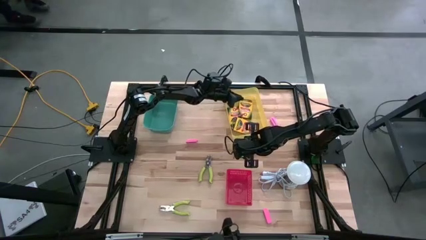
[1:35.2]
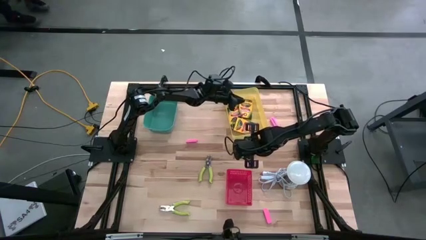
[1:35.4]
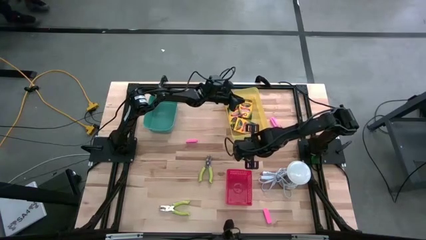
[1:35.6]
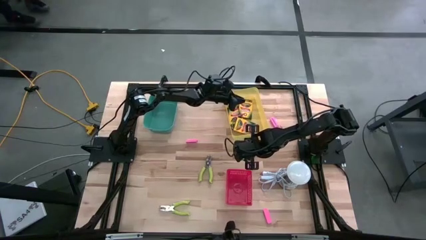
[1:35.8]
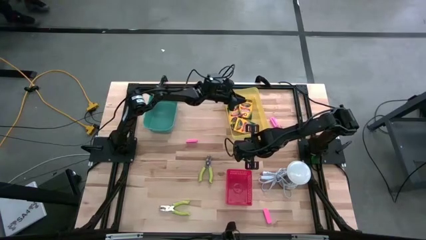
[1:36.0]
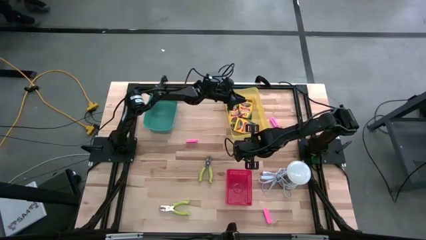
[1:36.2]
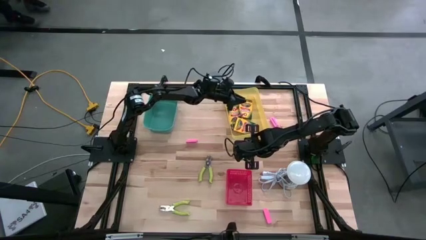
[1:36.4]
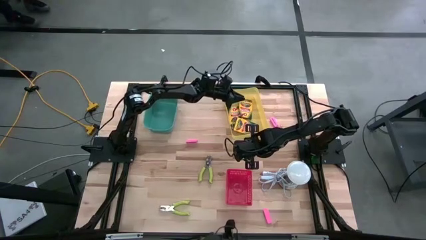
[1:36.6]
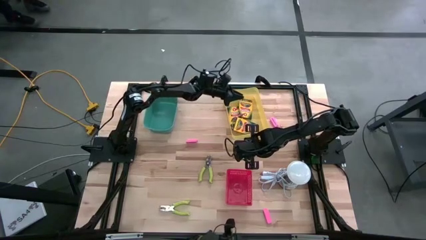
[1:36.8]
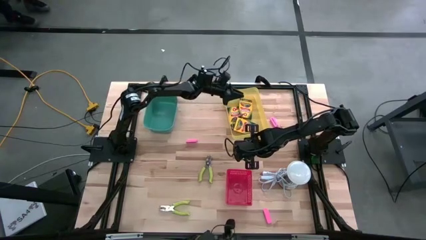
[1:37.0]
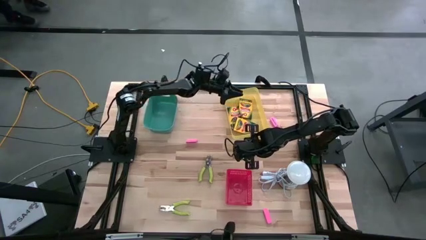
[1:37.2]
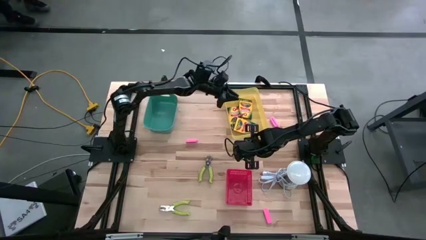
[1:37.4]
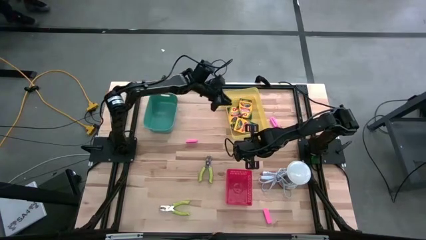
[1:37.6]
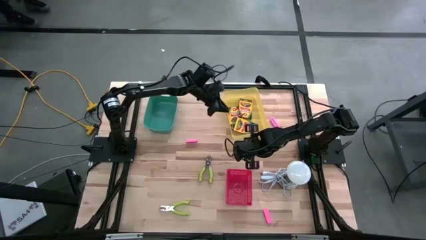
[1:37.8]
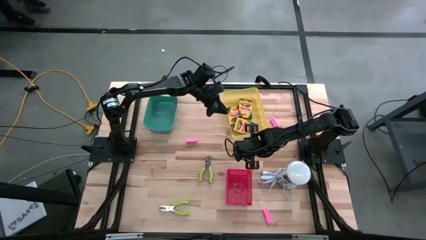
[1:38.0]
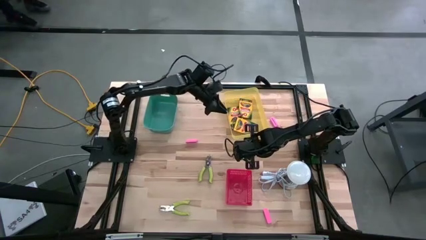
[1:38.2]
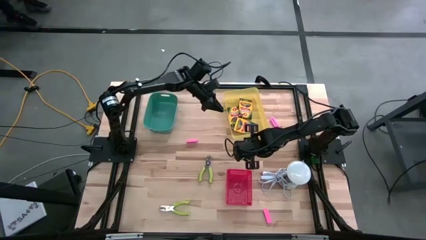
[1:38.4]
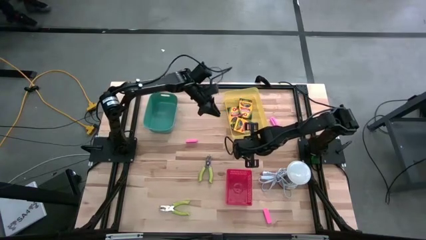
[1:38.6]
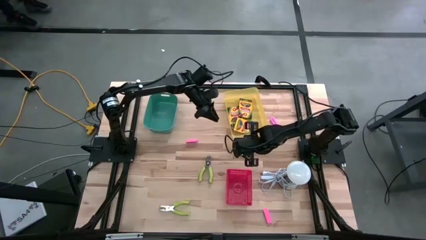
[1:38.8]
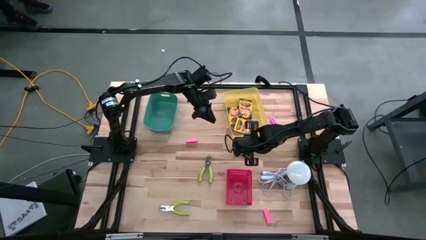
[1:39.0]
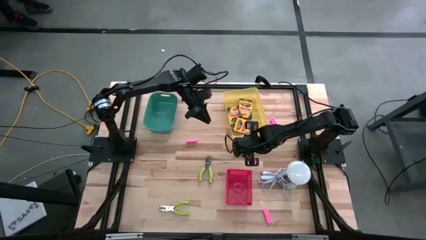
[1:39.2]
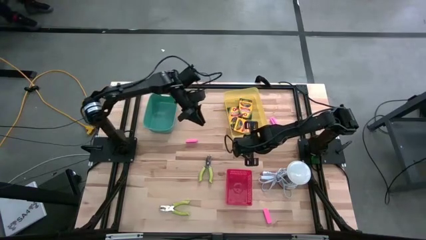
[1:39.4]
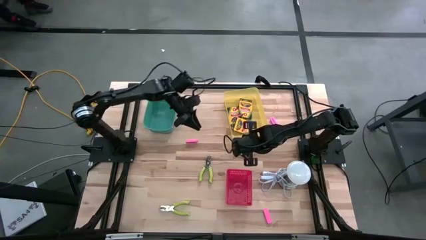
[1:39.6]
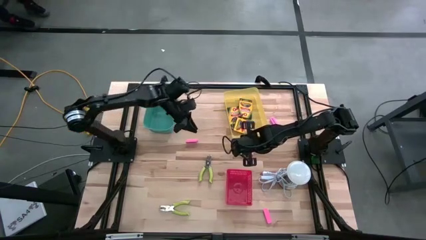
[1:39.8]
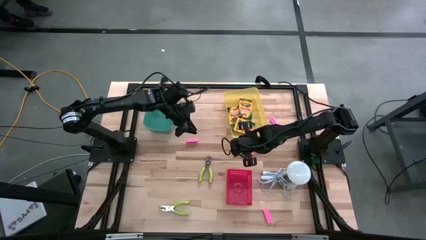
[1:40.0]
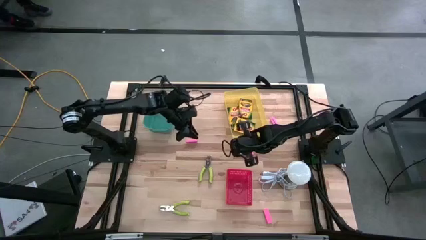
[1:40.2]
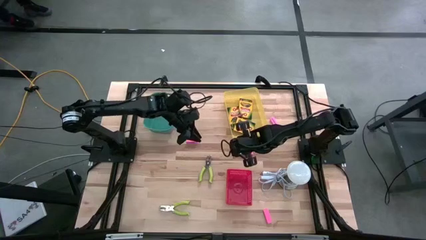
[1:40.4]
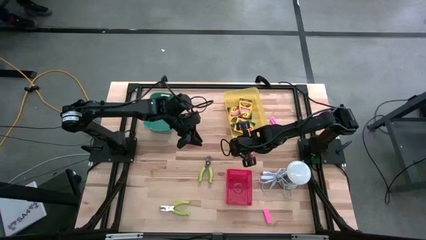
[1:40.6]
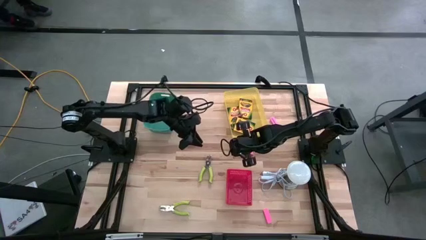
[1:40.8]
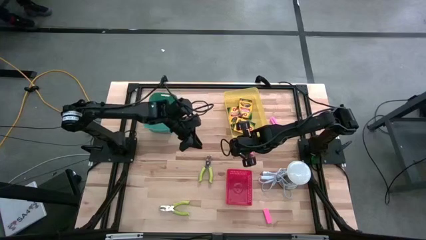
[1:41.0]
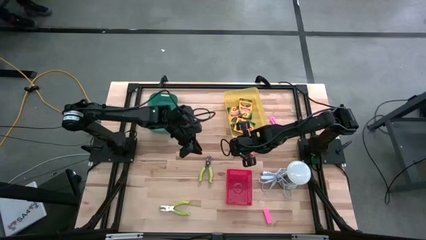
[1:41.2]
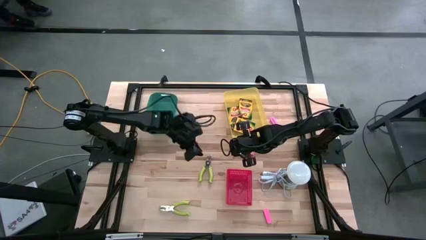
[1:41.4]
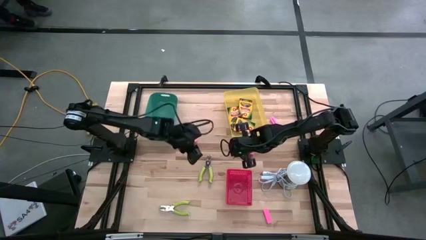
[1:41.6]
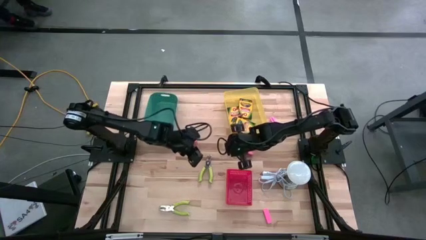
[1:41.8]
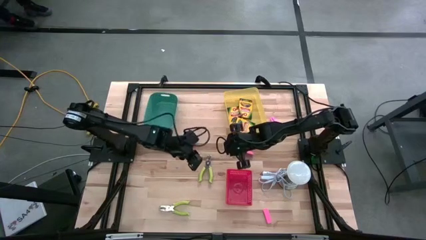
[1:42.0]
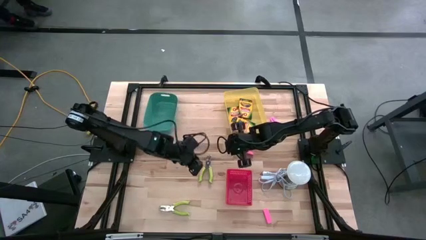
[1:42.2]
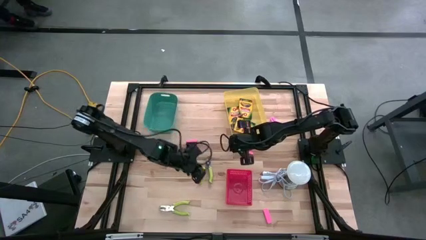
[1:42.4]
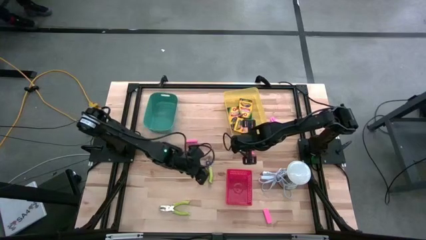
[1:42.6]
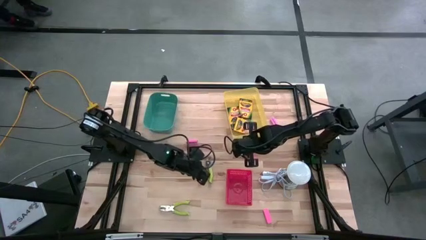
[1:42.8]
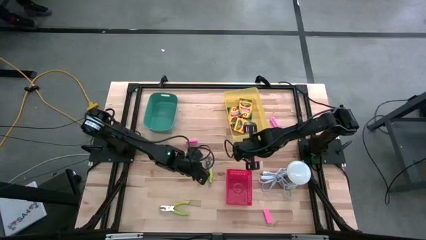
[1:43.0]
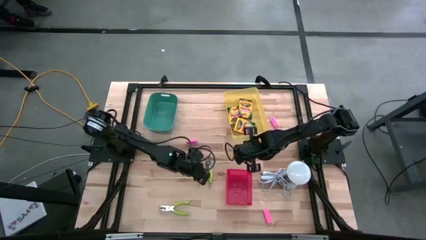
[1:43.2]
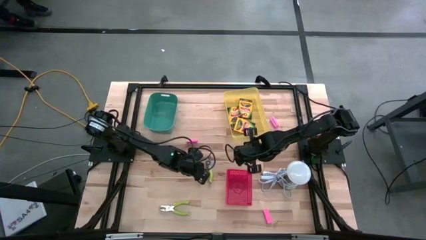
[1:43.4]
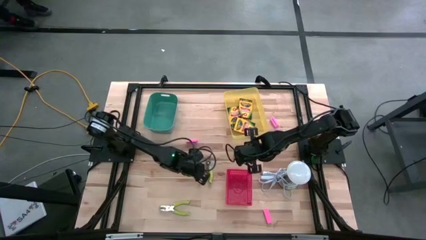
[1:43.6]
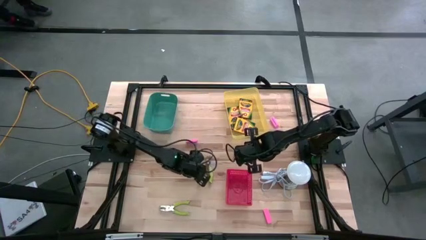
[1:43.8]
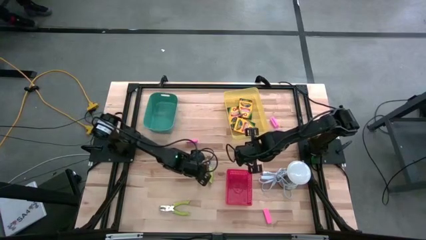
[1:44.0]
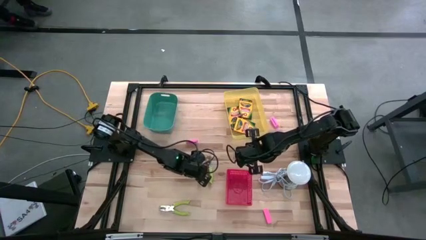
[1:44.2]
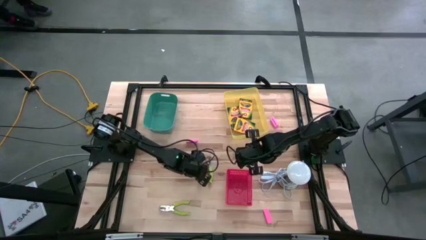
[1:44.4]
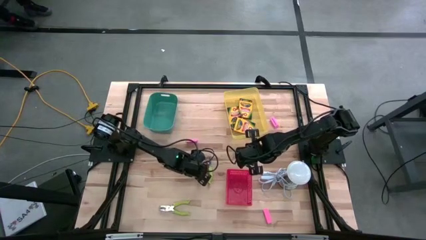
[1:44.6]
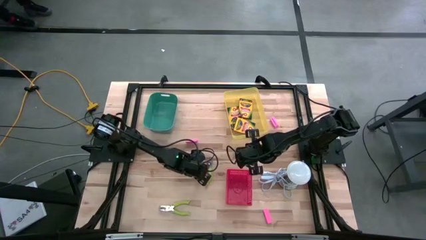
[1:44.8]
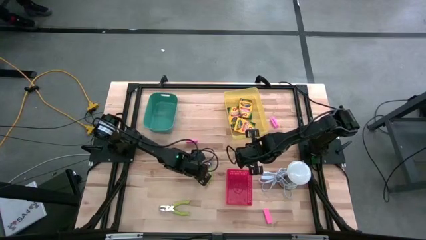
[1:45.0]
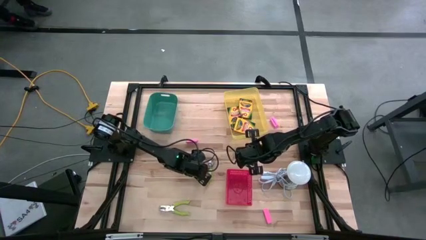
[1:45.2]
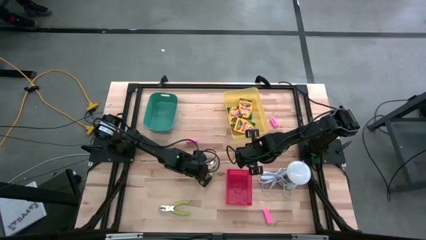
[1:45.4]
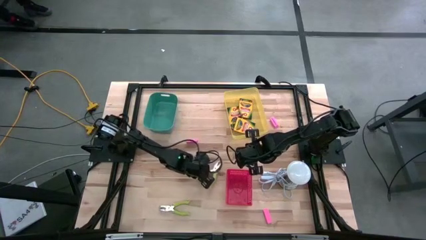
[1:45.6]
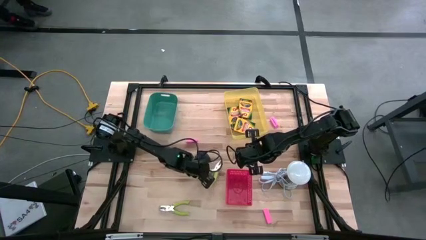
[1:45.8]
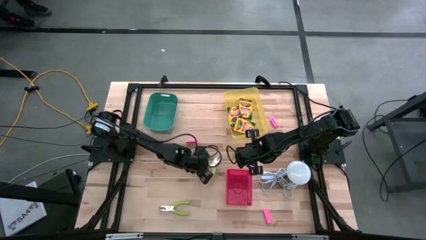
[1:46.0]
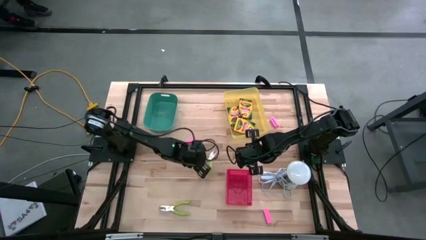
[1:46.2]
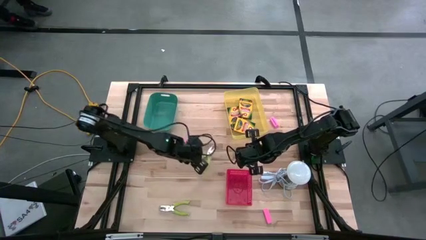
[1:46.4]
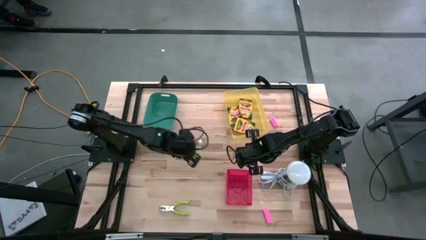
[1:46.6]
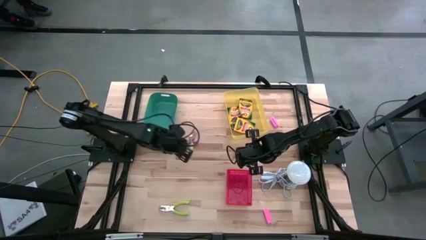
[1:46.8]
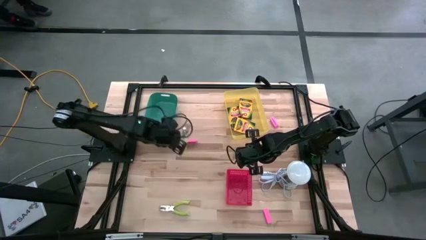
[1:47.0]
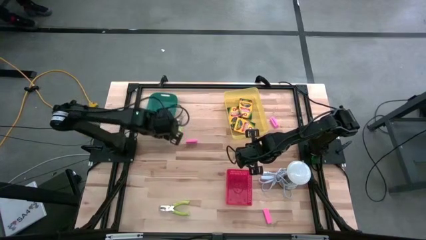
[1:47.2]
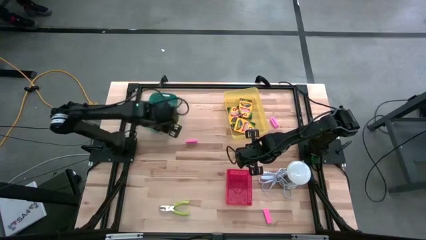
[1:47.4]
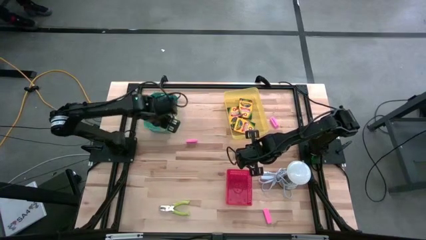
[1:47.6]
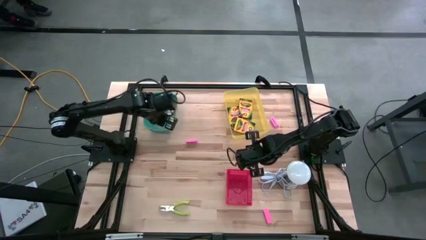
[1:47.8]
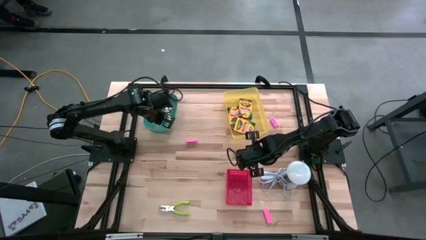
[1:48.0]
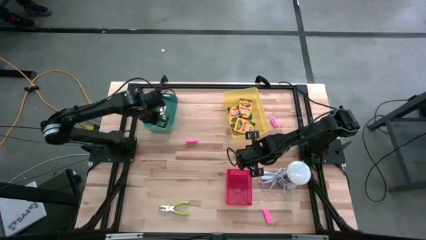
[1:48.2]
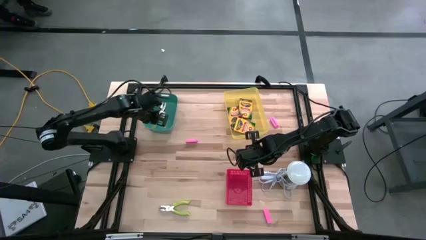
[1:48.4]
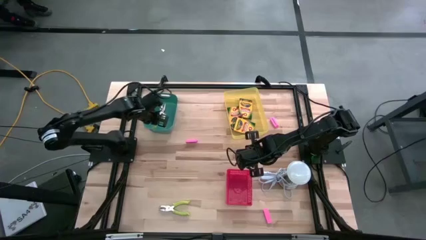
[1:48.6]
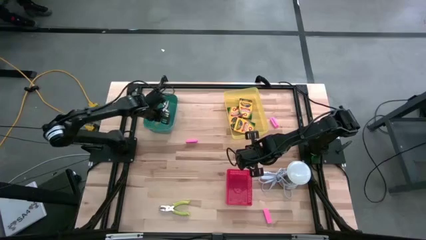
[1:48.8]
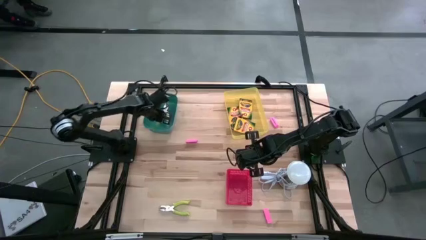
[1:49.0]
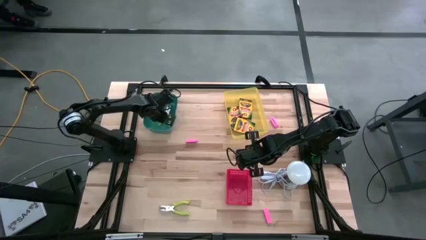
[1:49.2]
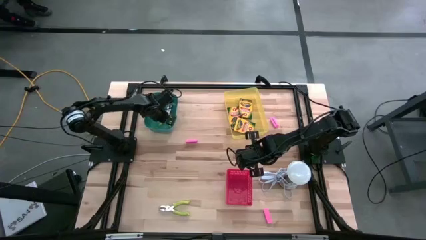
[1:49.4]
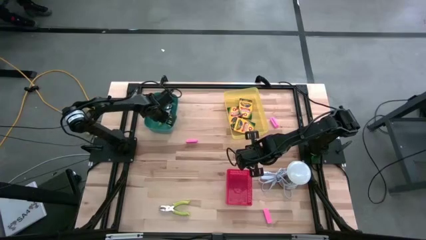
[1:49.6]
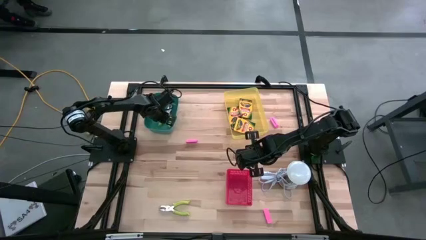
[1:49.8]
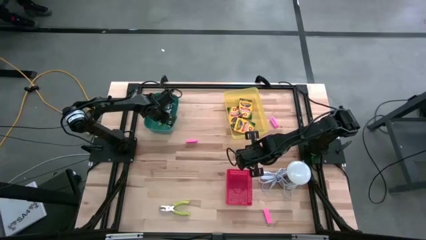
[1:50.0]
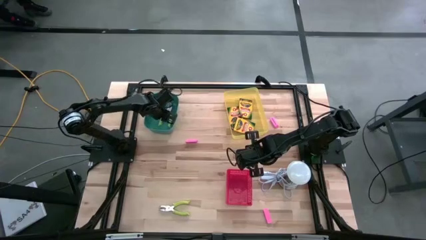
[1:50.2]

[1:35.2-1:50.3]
Task: Pick & Place School Supplies
Put the puncher hole into the green bin
